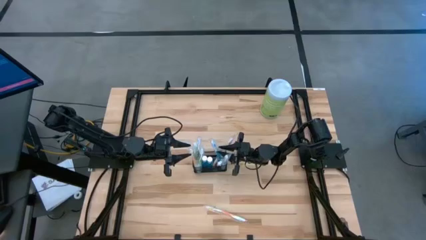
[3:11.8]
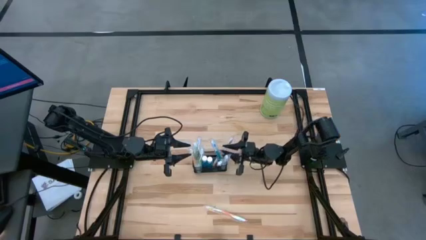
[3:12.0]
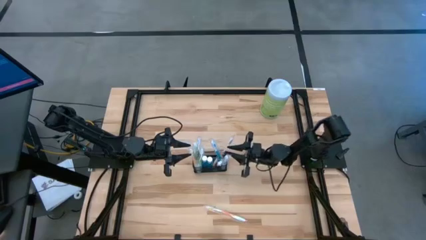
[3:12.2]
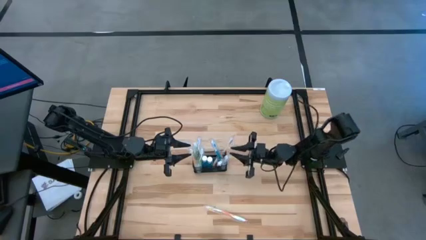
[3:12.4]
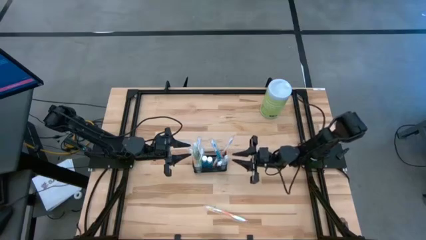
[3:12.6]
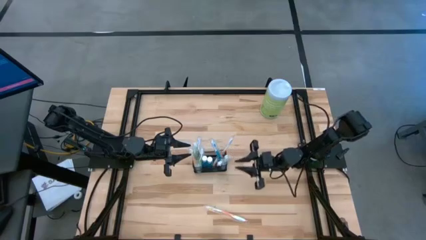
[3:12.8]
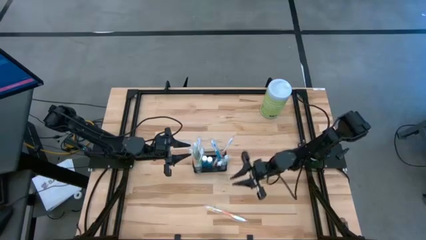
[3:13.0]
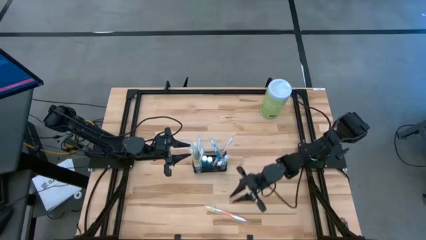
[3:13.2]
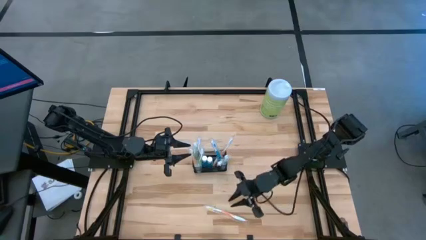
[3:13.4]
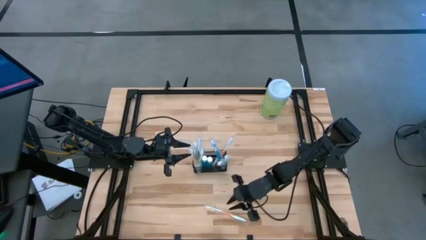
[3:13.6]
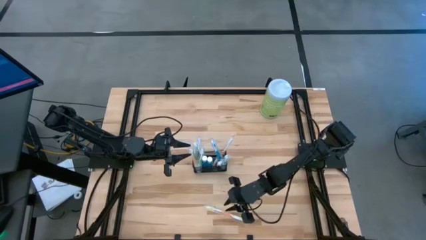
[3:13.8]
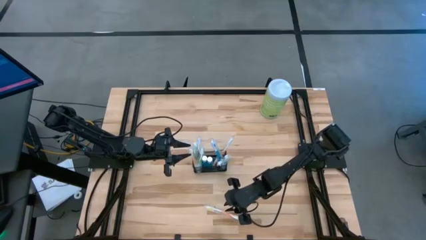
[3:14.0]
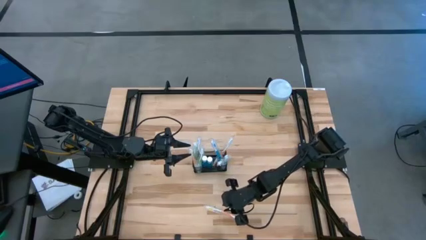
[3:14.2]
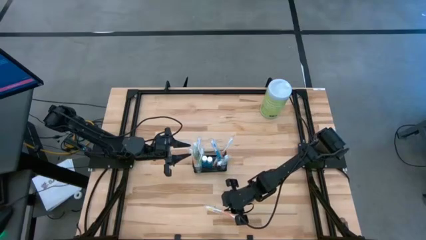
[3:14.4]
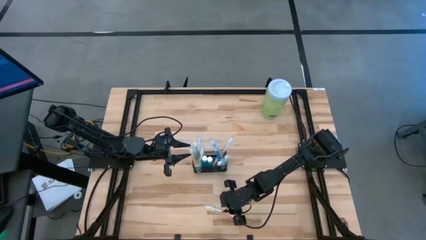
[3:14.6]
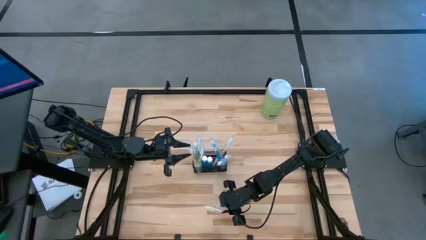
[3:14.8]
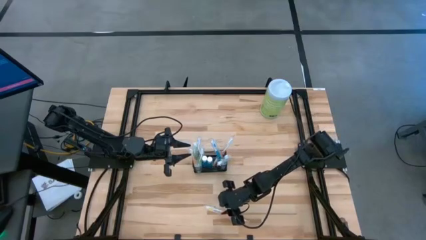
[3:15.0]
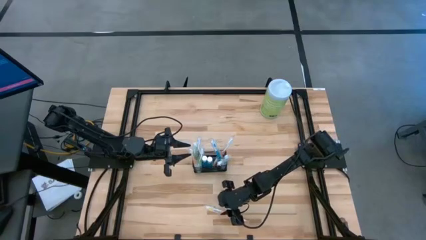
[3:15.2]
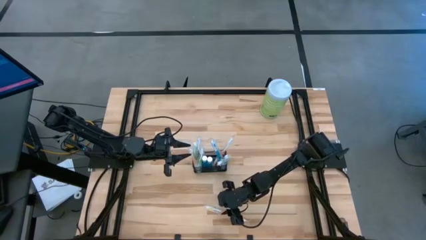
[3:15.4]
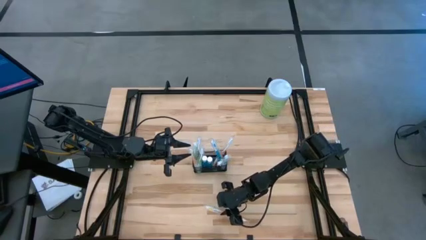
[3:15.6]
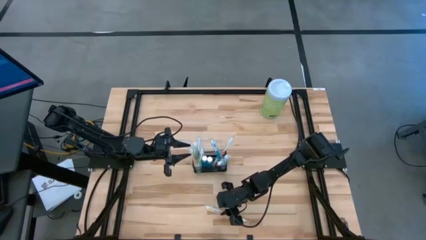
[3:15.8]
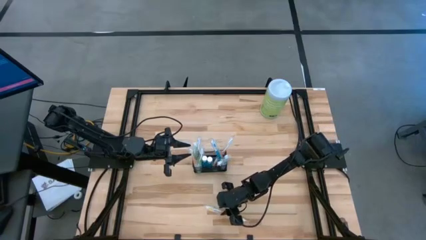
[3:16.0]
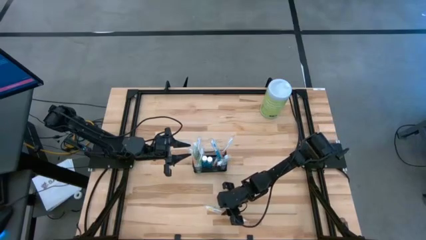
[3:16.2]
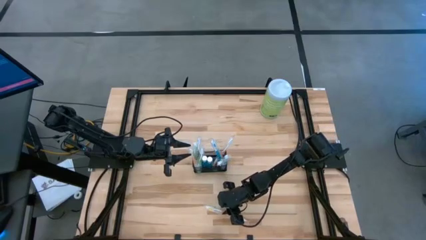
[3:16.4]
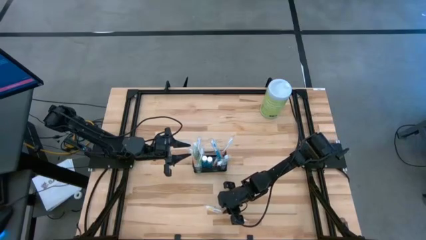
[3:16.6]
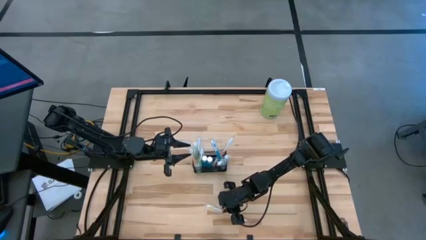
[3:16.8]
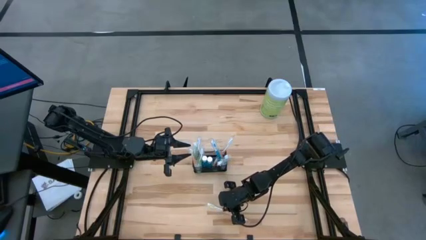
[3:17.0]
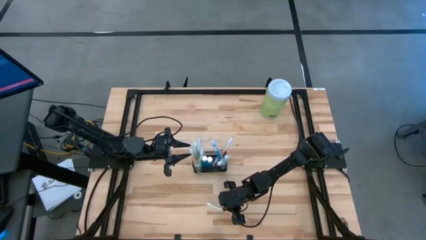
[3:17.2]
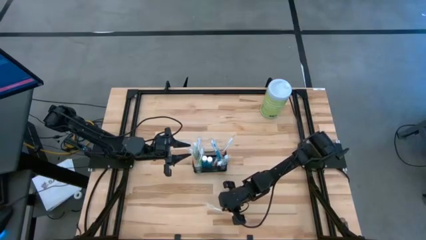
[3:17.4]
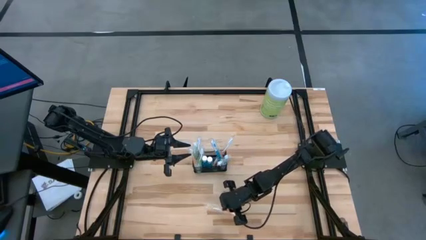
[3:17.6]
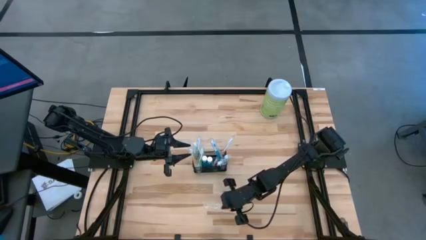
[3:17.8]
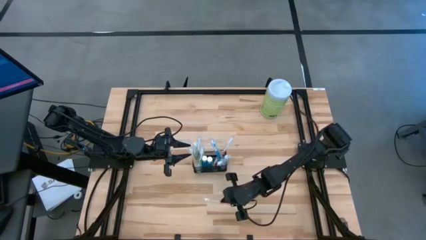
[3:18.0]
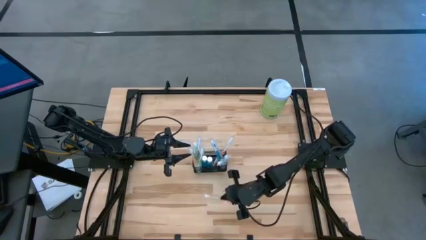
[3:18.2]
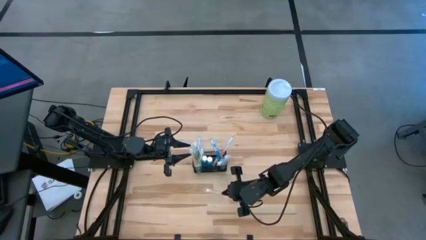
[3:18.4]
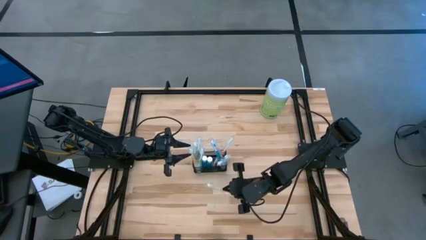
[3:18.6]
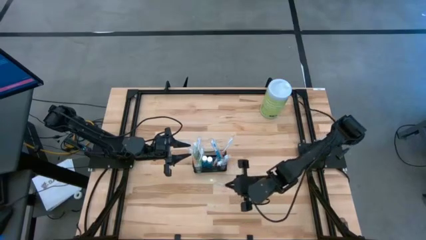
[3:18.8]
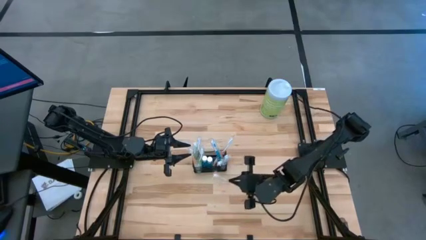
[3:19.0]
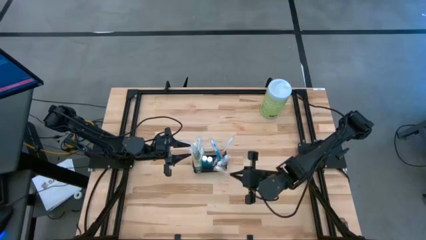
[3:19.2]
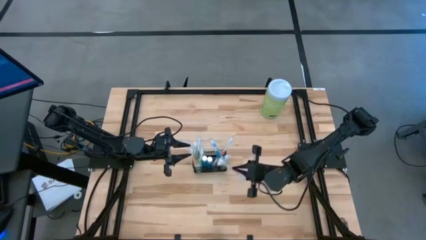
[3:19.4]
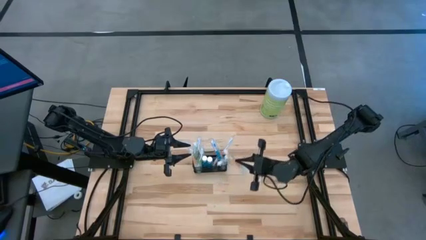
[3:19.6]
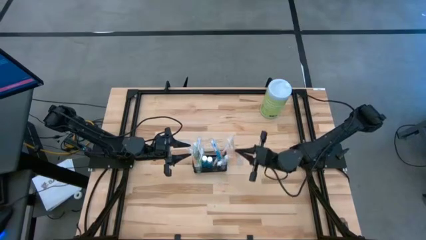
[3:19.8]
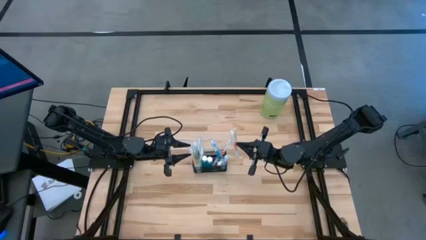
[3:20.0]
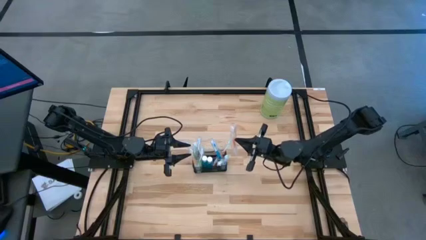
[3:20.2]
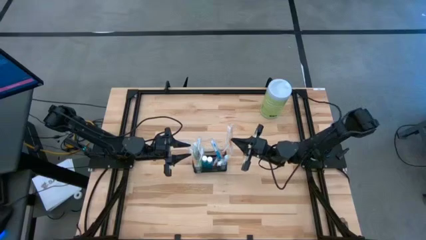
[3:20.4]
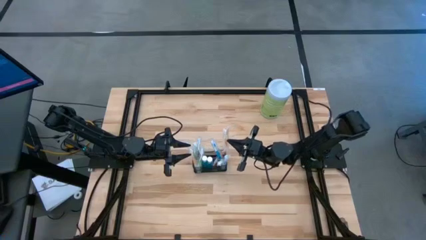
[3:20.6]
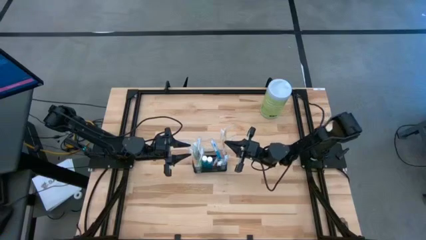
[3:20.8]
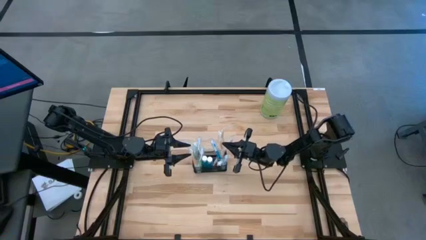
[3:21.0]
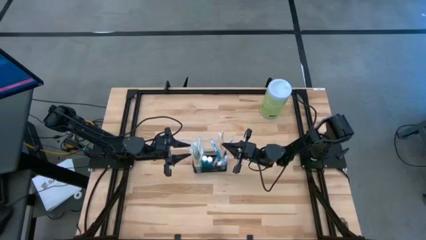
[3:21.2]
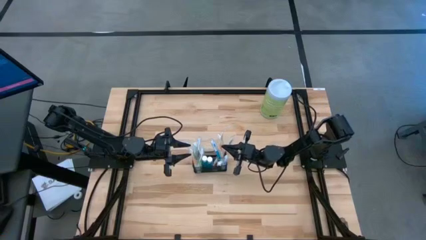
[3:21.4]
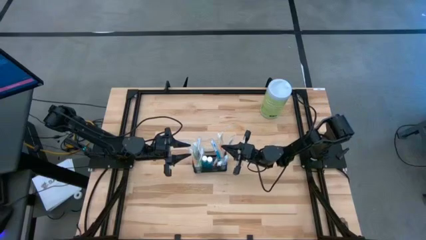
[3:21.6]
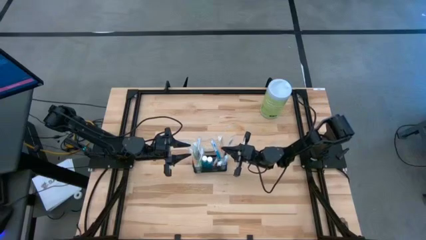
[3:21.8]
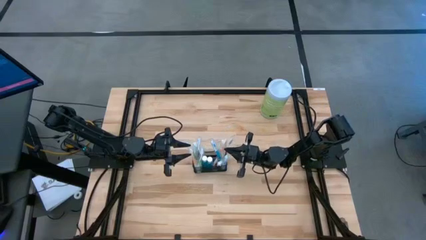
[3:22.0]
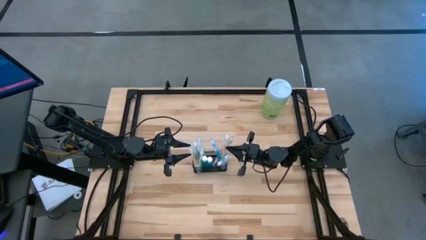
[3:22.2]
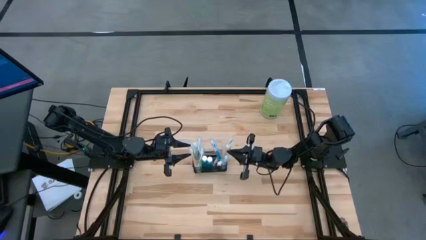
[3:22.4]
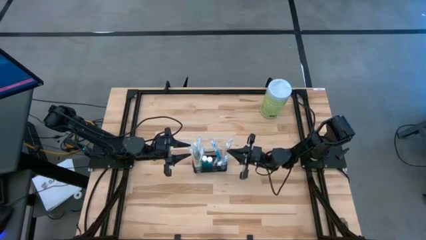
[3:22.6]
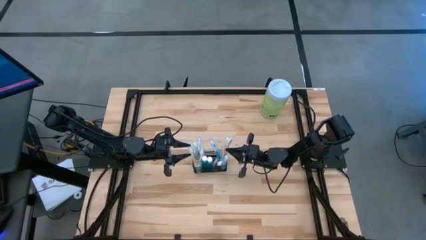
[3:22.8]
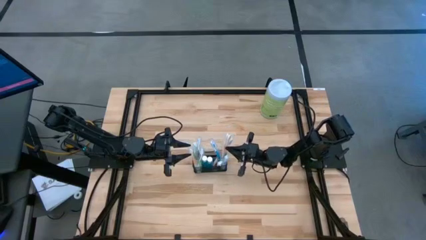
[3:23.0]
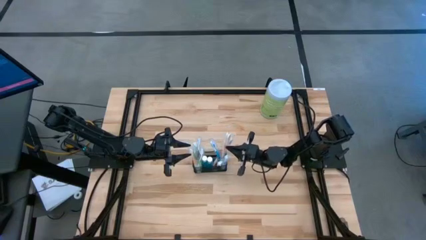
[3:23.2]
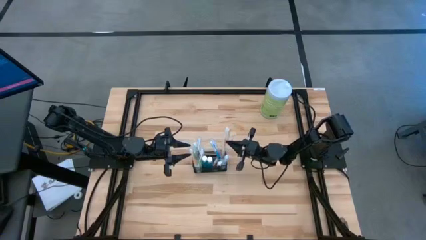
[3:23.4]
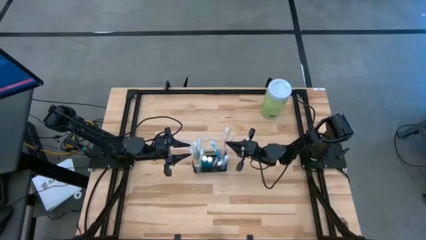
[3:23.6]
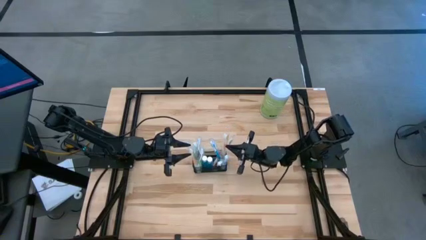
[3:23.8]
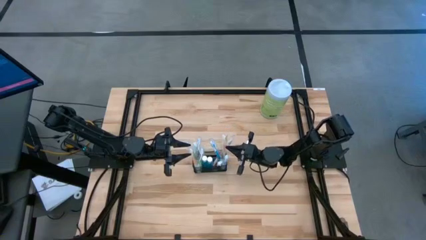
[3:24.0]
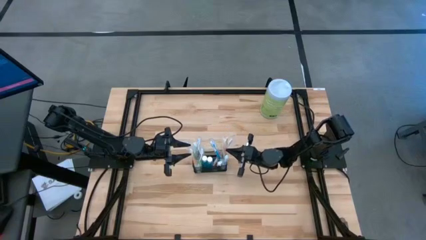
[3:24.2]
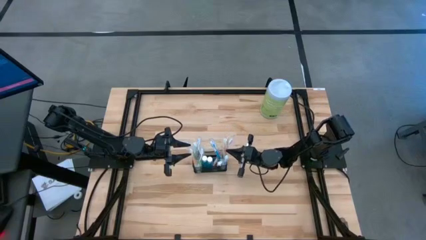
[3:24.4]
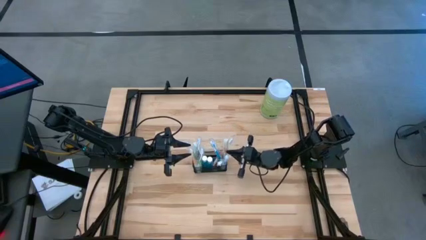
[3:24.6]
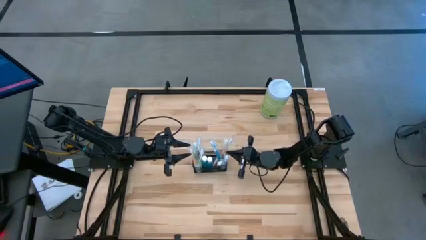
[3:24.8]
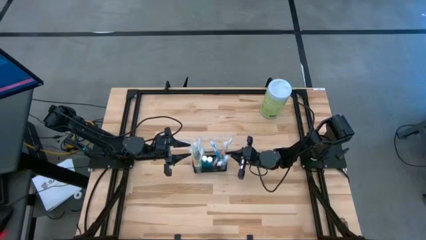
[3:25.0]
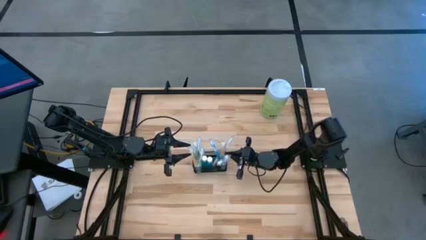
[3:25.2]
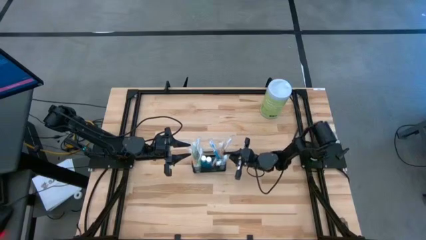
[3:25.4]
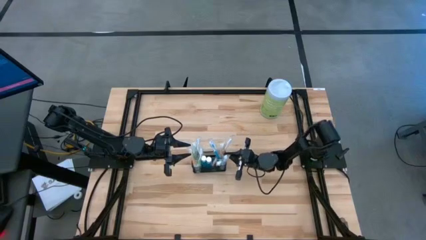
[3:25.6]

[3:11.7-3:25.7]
Task: Pick & Place toothbrushing station
Put the orange toothbrush into the mesh

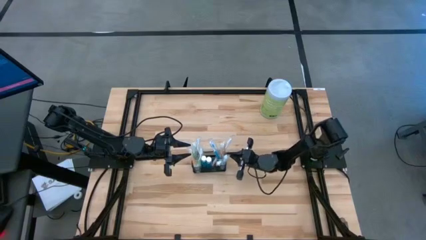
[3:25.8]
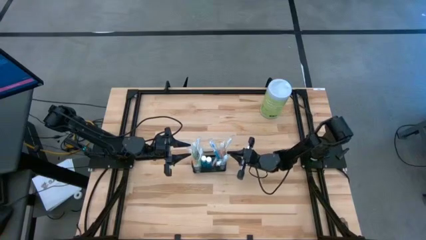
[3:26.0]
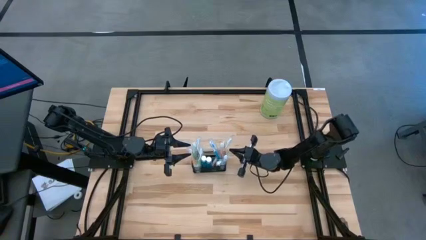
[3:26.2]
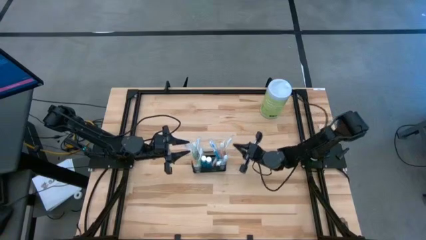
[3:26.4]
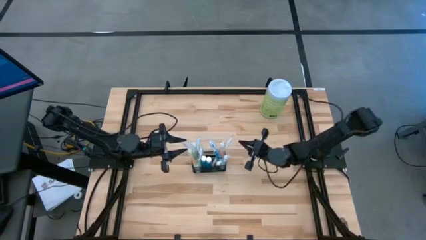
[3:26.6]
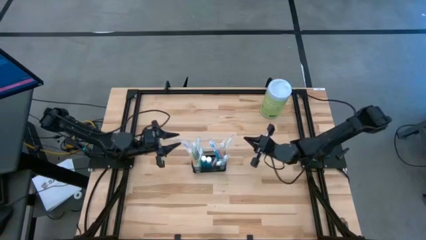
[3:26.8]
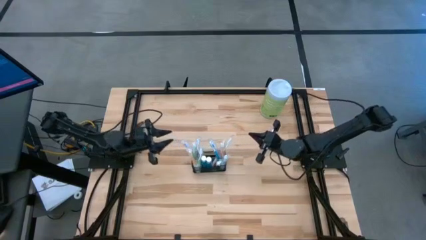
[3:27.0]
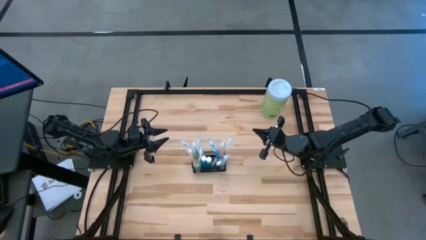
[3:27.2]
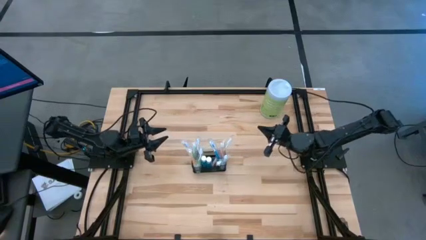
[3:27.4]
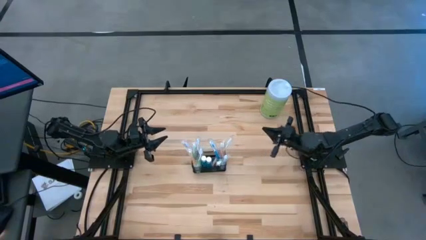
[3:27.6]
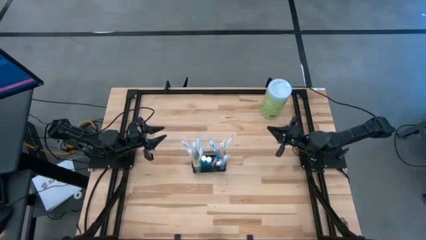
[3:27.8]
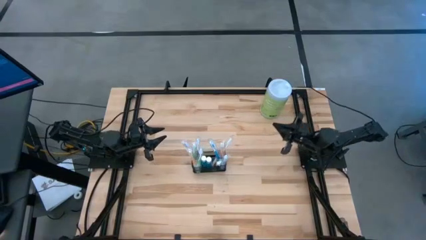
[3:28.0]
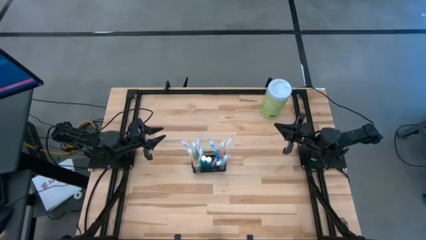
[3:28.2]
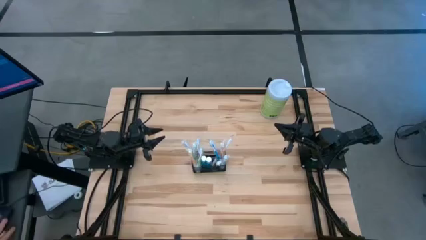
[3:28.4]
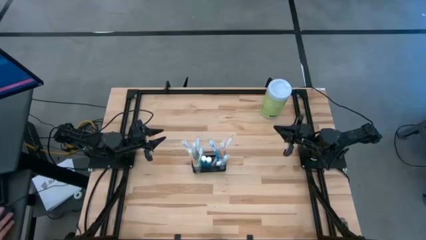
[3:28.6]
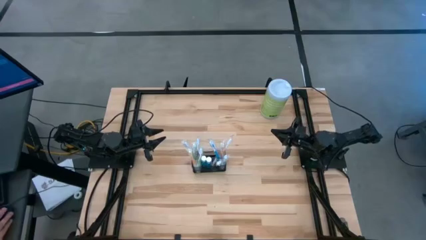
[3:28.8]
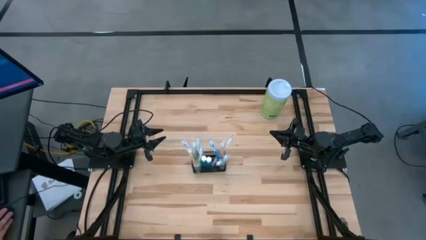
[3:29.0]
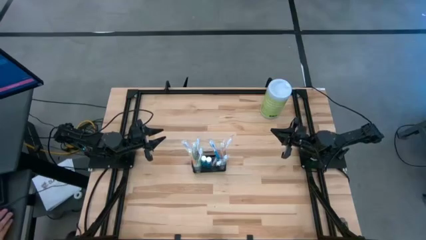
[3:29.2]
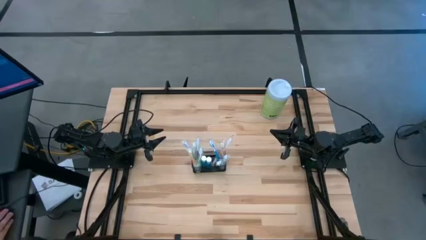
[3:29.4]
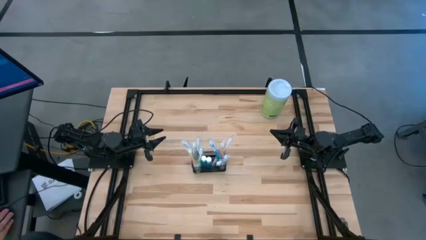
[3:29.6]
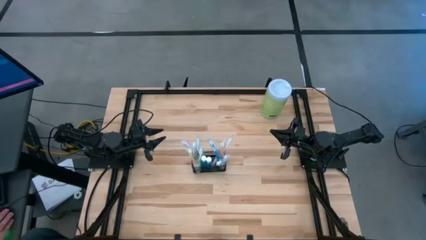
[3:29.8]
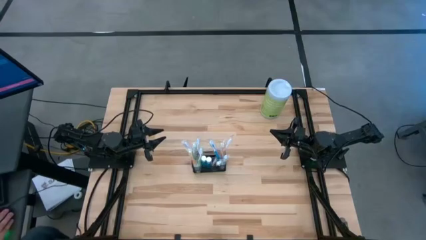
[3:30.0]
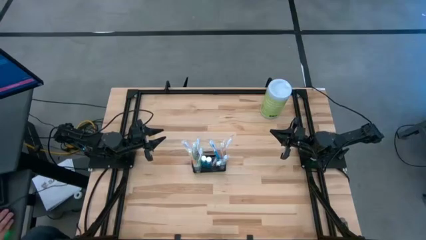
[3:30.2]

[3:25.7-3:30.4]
Return to Home Position
